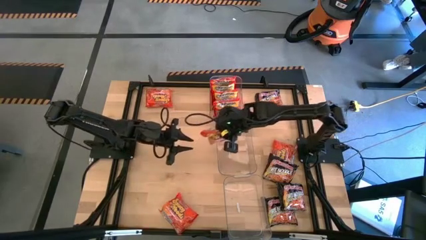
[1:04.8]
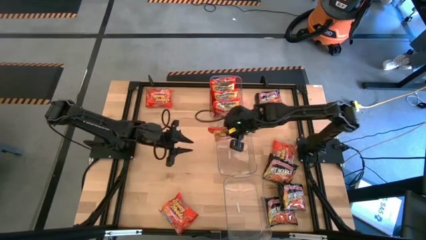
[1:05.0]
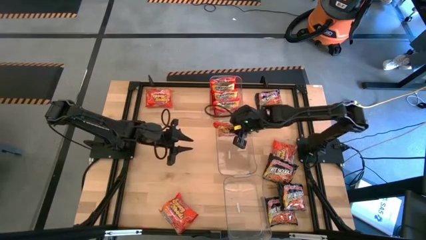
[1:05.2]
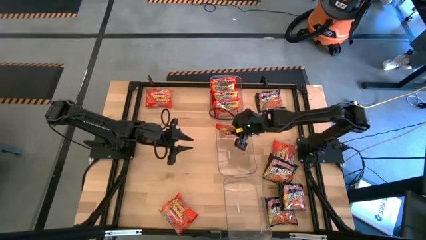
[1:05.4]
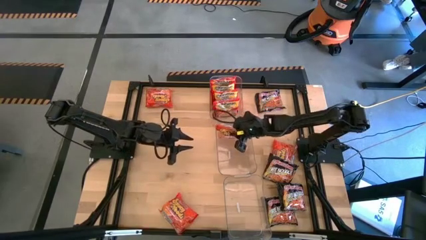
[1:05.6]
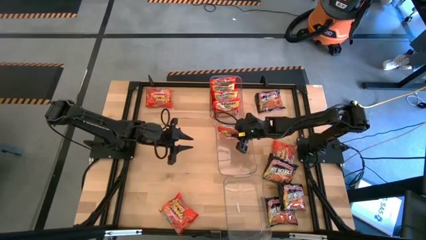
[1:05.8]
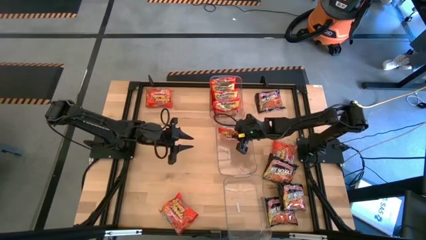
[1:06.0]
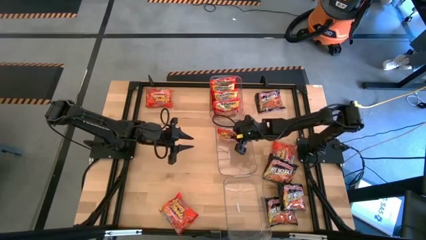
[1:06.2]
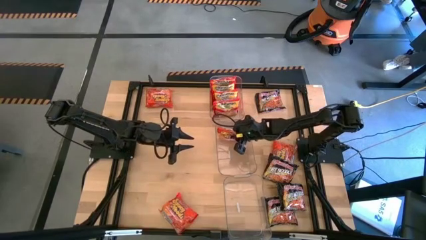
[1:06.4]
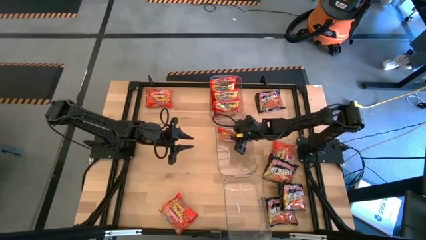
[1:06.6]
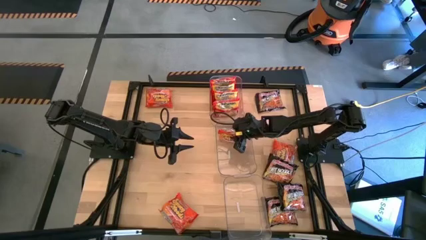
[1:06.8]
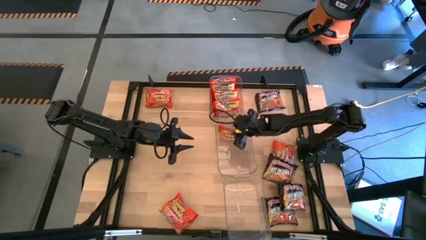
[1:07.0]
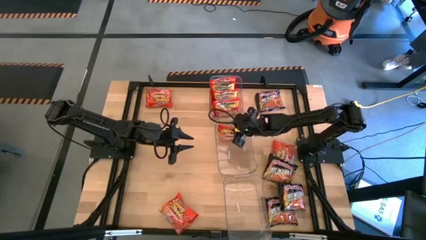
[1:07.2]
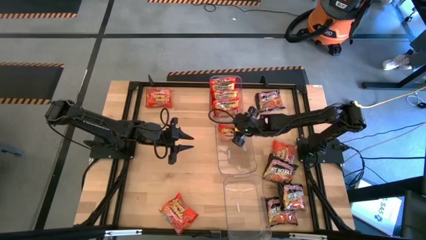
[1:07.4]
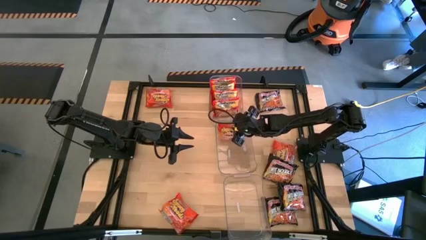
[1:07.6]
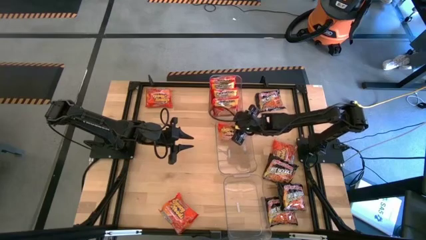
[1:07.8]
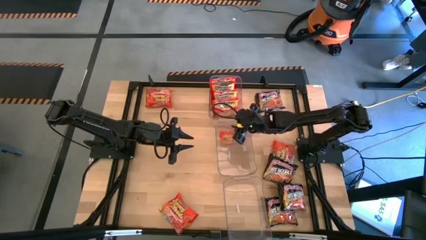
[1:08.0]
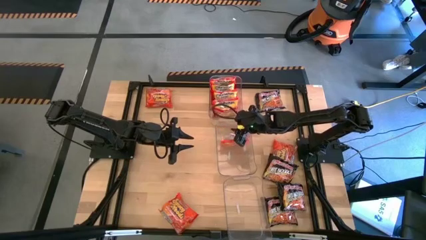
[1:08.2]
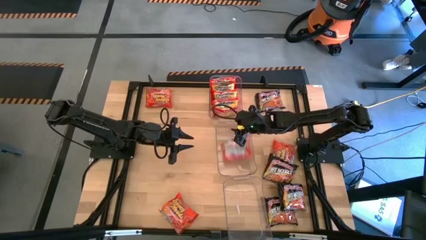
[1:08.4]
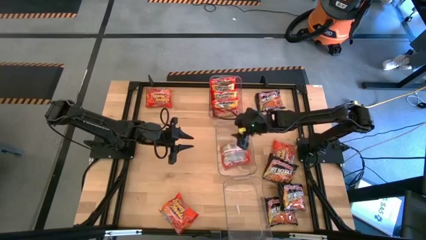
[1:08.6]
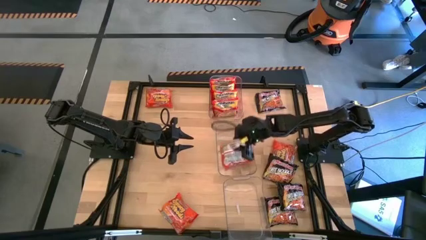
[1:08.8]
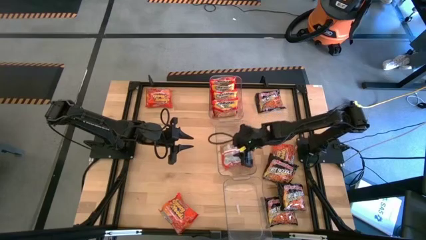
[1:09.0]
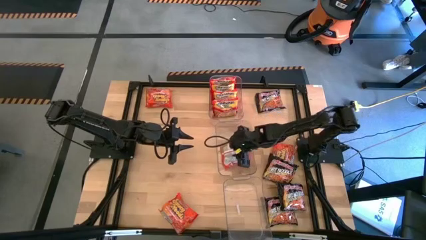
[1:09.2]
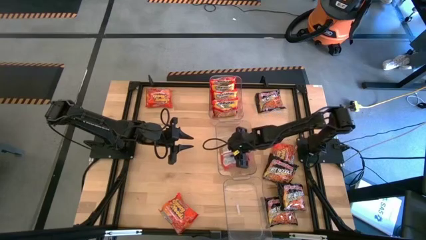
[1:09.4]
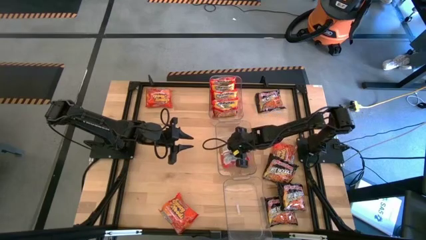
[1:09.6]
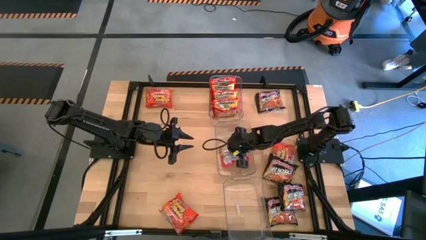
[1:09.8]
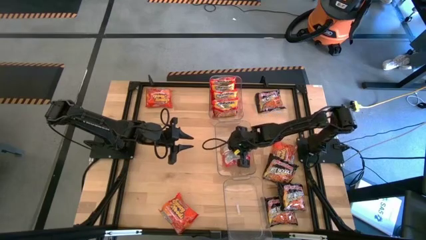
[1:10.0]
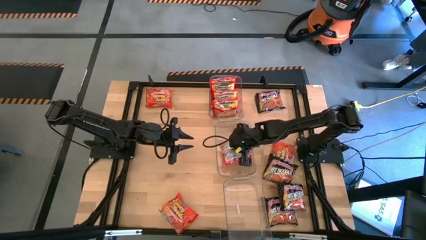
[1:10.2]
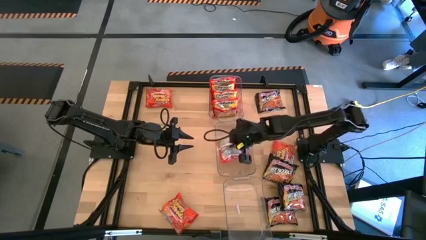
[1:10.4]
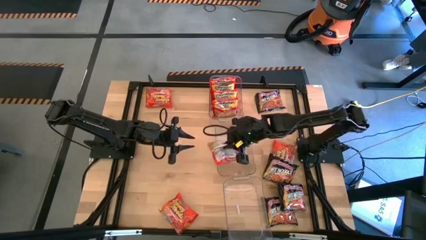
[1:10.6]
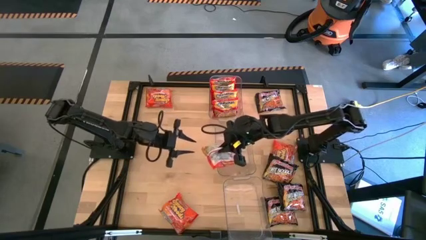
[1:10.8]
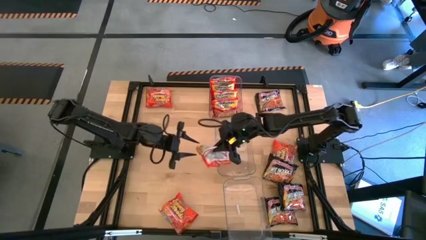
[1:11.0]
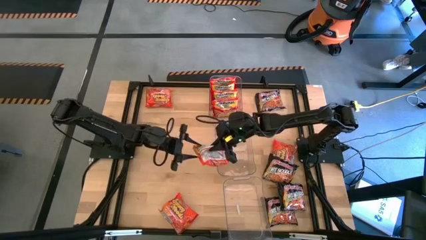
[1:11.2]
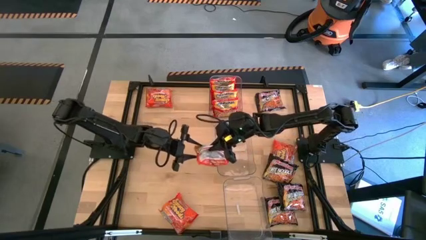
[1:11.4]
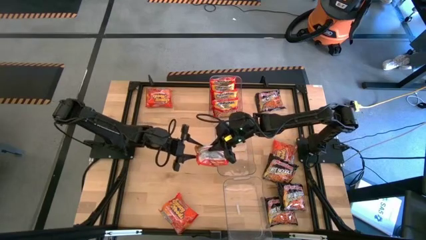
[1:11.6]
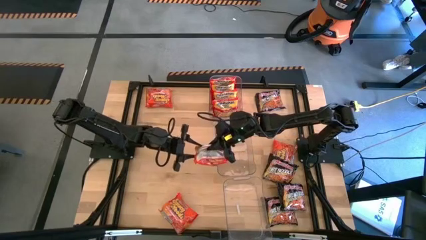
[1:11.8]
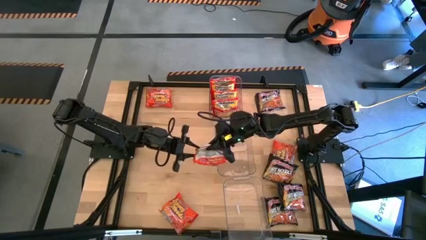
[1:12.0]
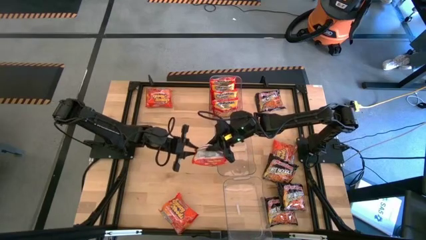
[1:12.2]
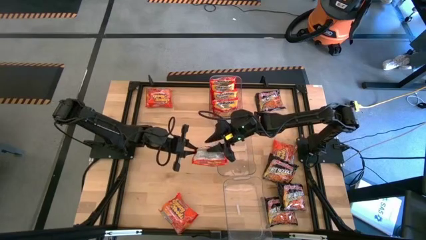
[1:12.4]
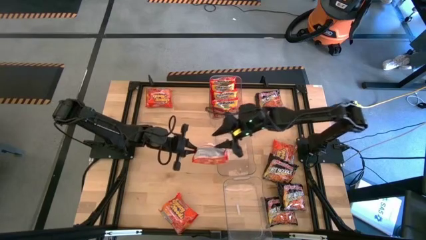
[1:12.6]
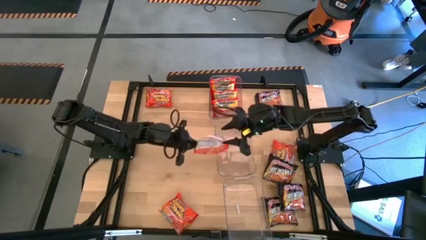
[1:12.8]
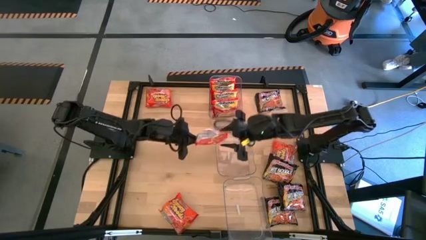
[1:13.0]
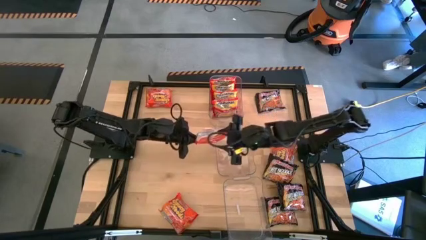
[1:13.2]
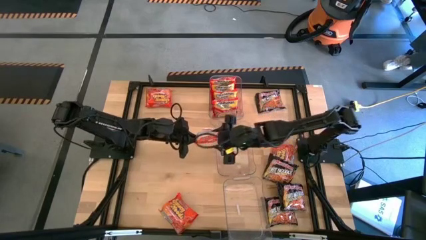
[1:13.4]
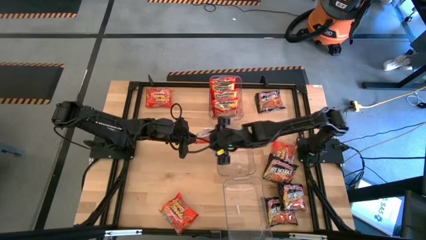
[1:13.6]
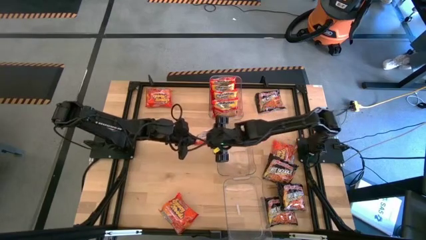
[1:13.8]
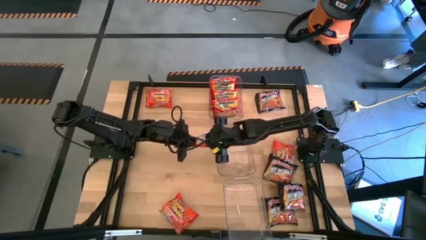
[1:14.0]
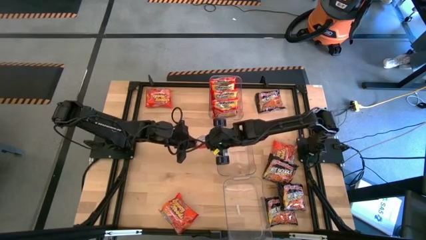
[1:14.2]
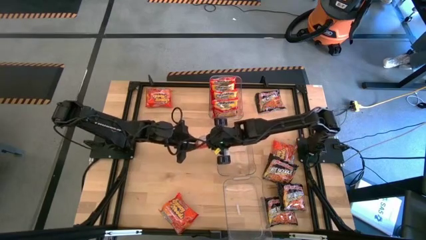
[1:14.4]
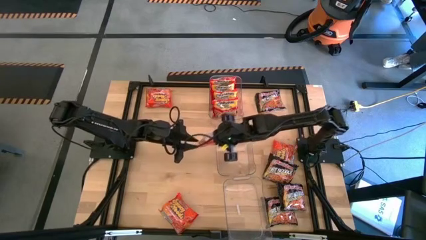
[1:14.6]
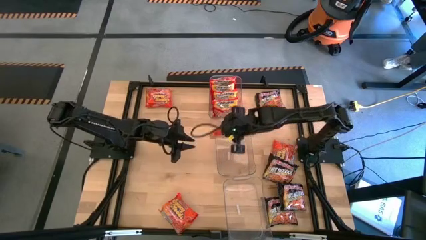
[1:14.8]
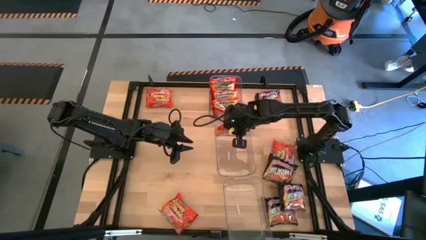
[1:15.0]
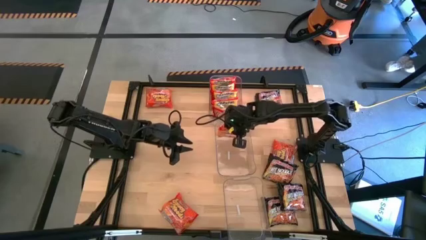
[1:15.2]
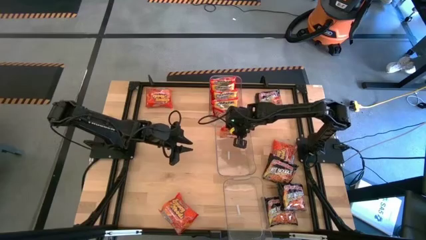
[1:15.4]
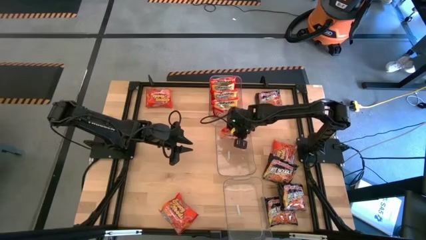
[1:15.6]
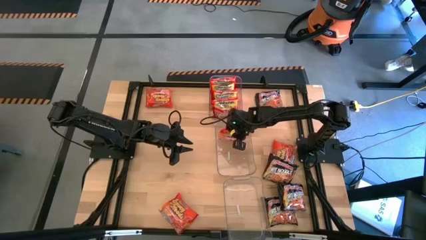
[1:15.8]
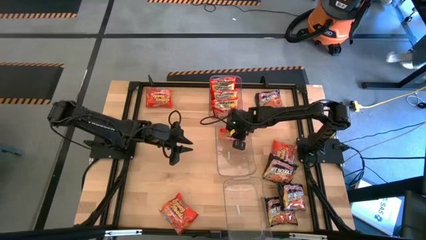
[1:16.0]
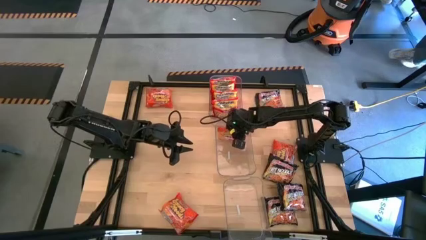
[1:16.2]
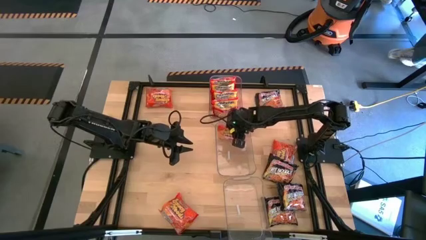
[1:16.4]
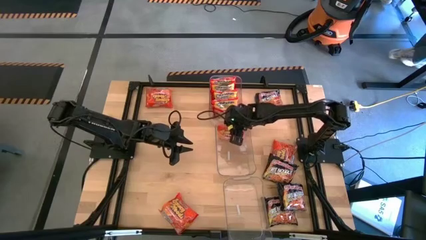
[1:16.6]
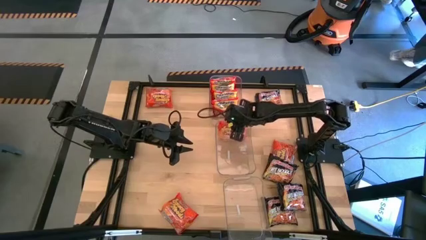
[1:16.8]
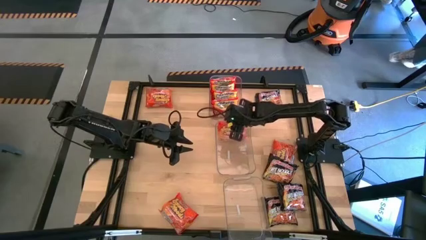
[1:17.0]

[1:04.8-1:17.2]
Task: Sort Maruchan noodles
Put the orange noodle pack into the middle transparent bin

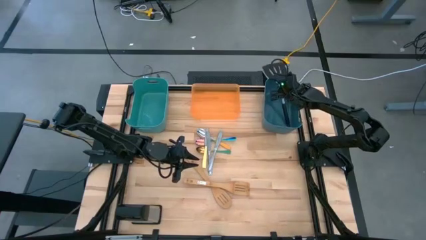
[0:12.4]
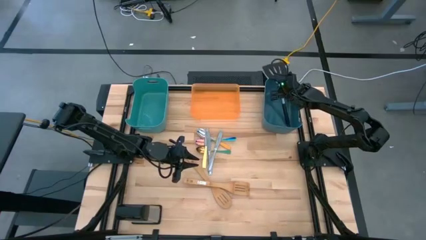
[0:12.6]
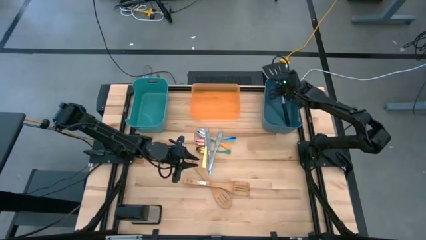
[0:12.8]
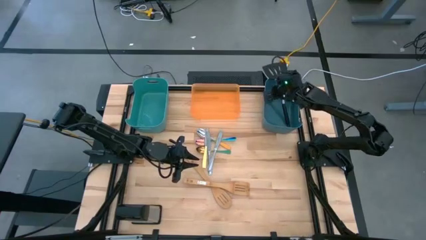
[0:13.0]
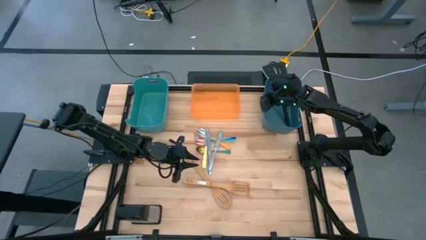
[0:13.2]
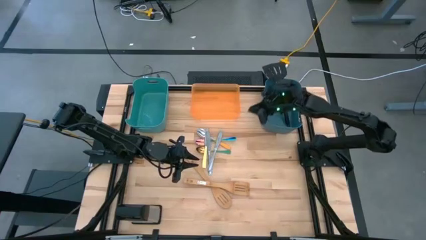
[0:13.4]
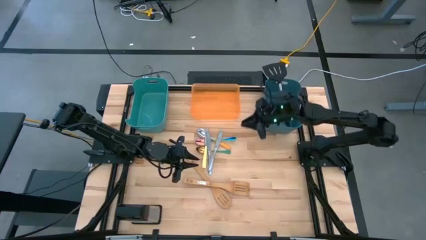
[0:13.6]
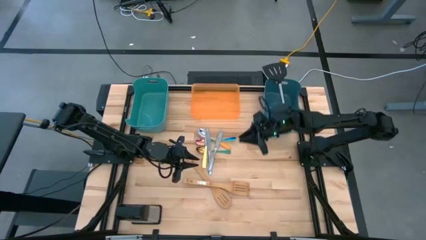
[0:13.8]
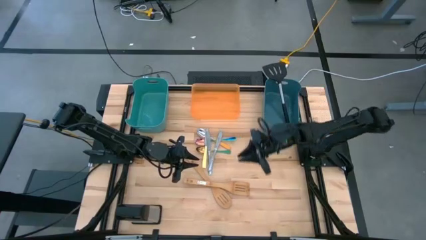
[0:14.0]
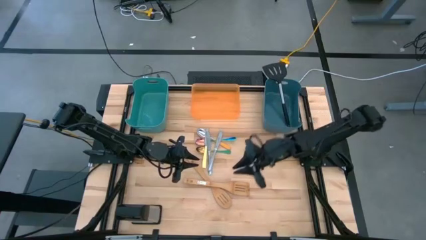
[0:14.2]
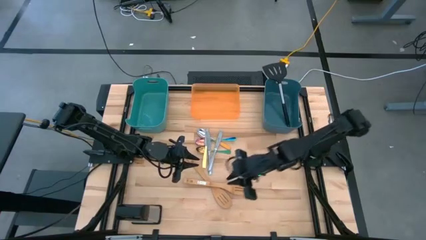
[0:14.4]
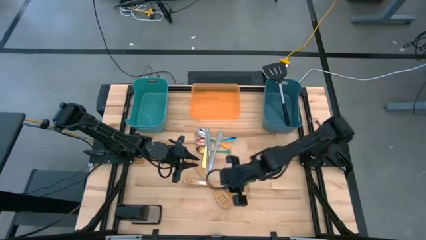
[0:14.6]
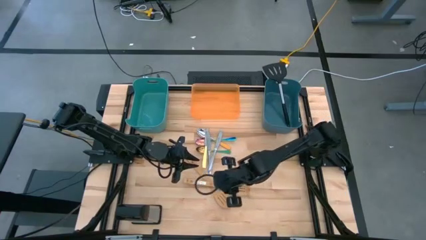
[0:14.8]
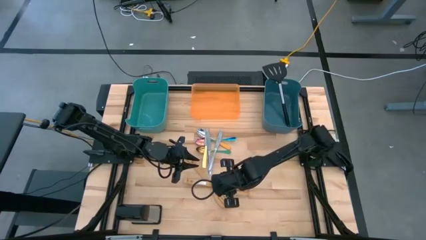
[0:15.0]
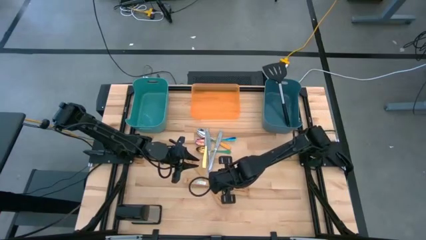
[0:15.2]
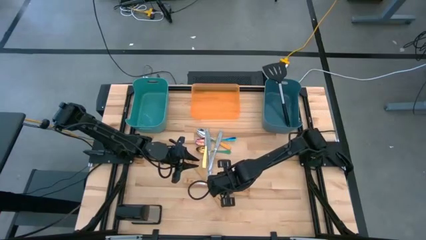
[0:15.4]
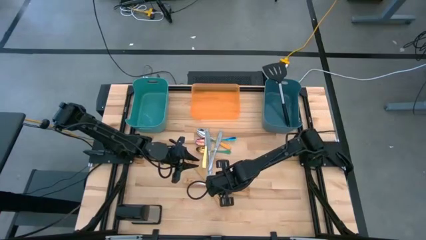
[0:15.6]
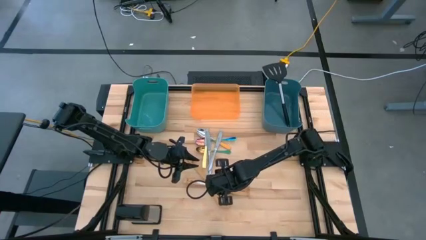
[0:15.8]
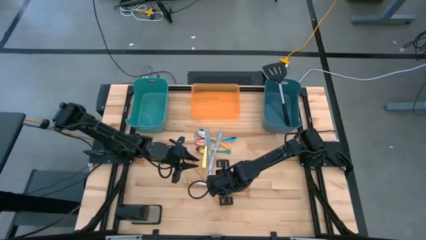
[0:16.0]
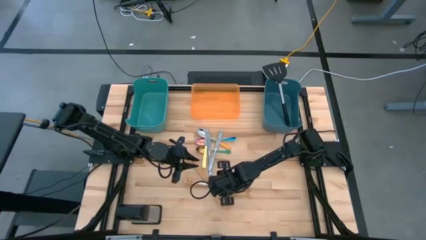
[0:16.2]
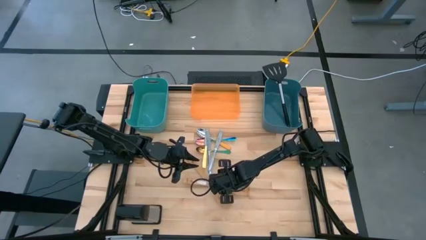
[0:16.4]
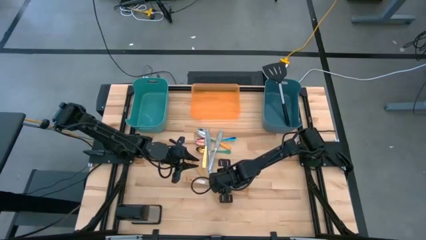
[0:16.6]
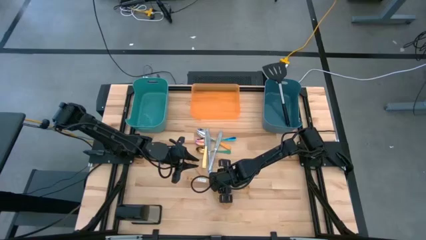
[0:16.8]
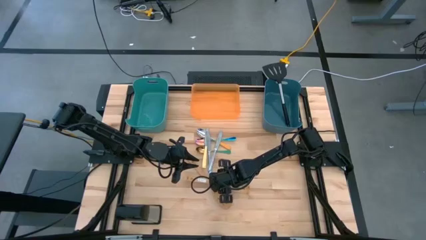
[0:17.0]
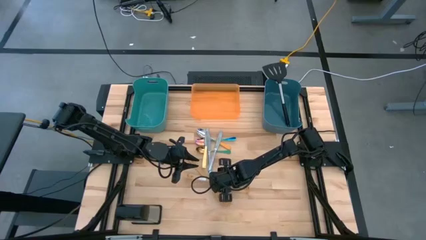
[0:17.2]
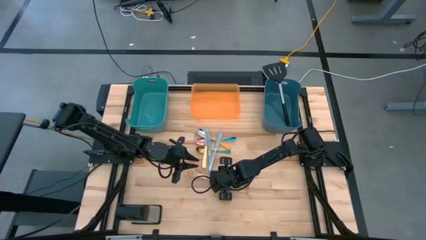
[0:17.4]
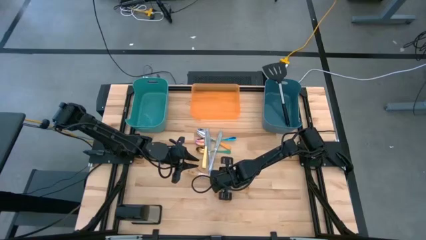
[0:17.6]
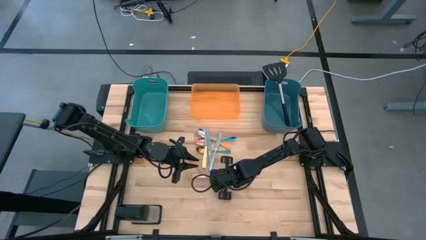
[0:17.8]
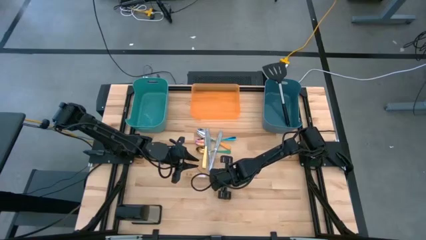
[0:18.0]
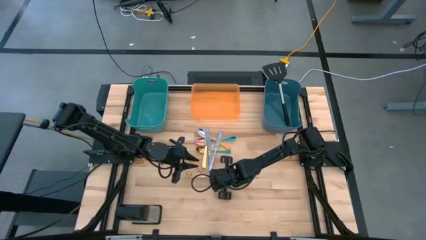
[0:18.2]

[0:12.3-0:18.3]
Task: Pick & Place Kitchen Items
Put the top brown spatula into the blue bin
